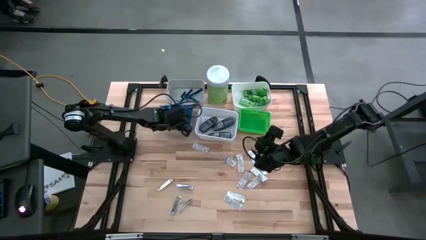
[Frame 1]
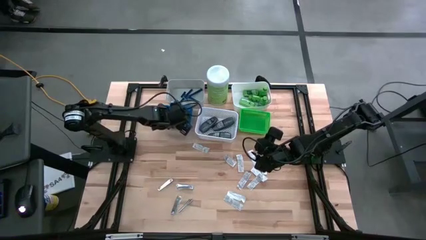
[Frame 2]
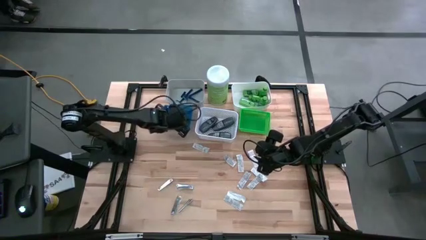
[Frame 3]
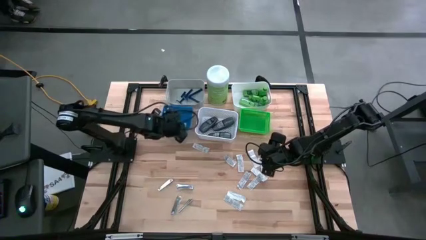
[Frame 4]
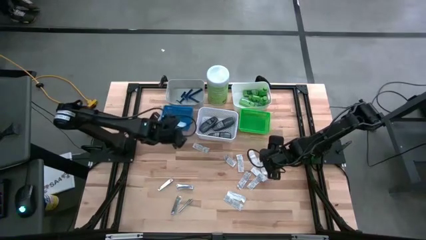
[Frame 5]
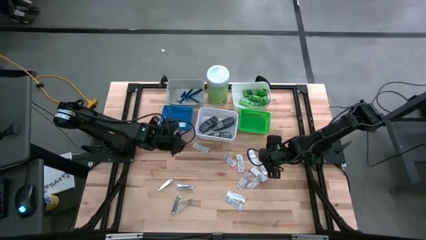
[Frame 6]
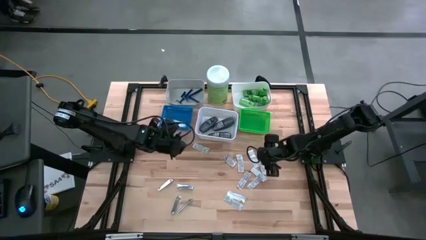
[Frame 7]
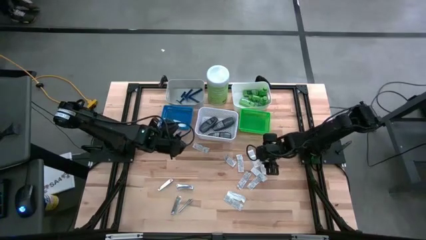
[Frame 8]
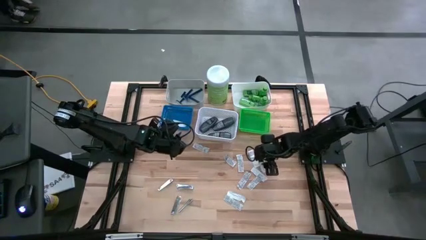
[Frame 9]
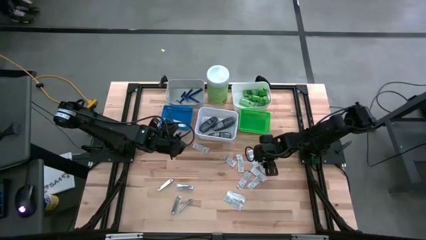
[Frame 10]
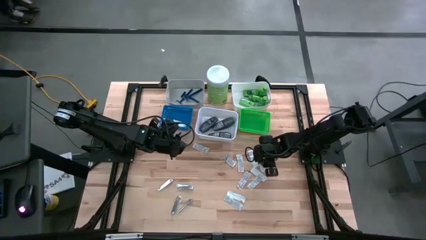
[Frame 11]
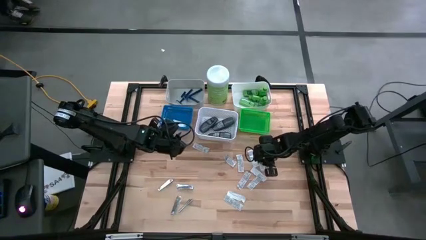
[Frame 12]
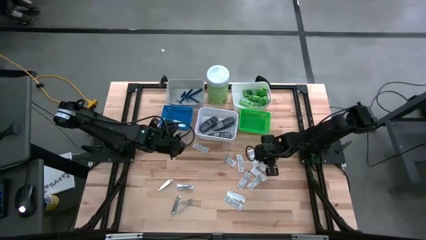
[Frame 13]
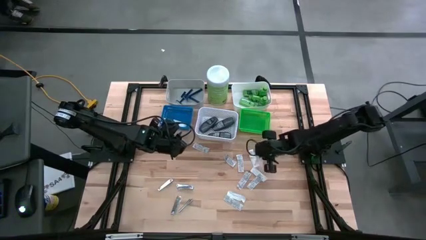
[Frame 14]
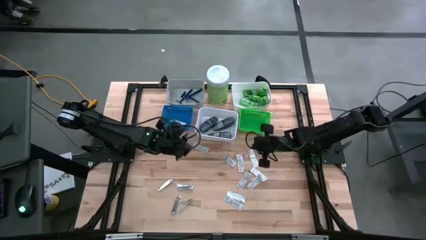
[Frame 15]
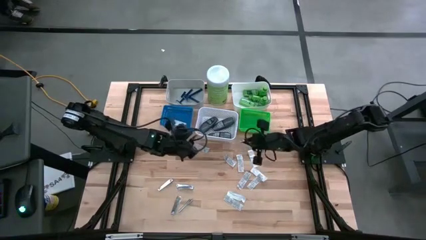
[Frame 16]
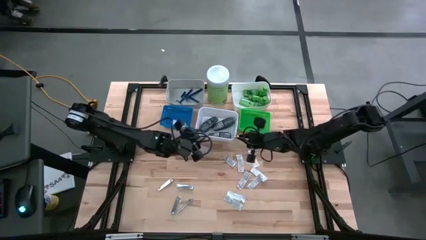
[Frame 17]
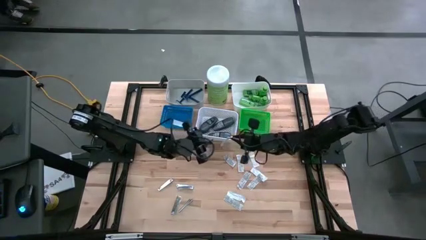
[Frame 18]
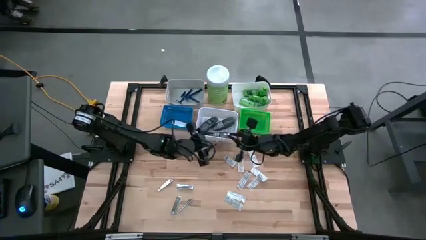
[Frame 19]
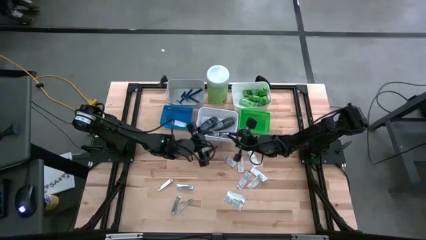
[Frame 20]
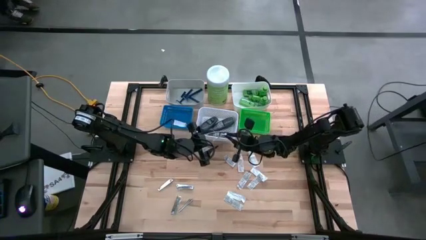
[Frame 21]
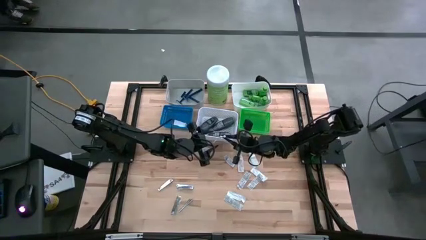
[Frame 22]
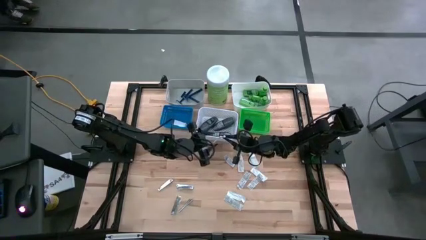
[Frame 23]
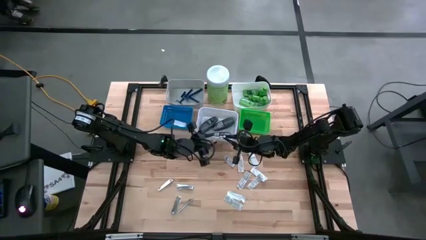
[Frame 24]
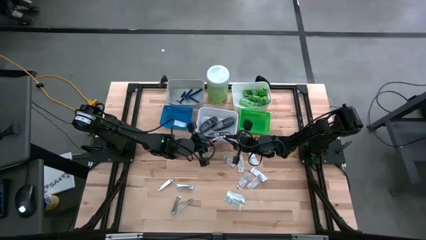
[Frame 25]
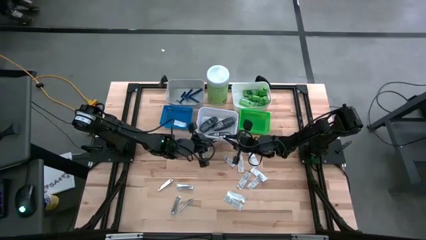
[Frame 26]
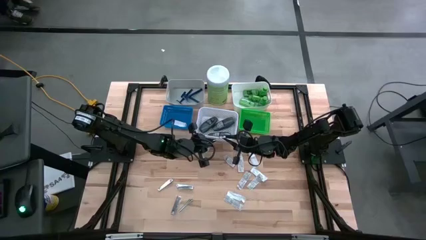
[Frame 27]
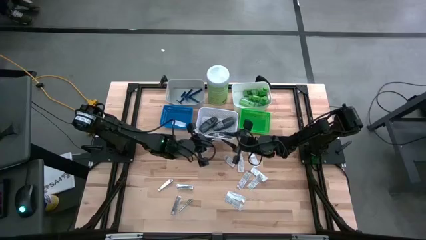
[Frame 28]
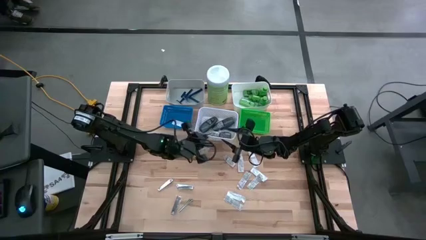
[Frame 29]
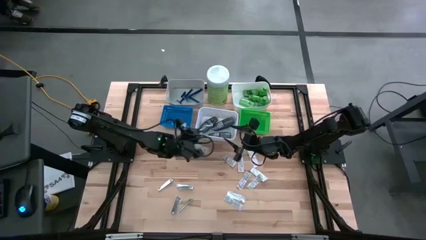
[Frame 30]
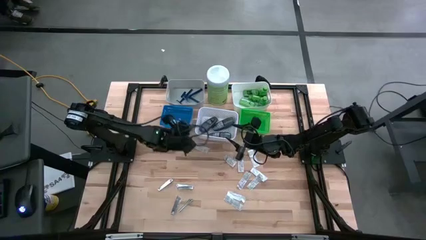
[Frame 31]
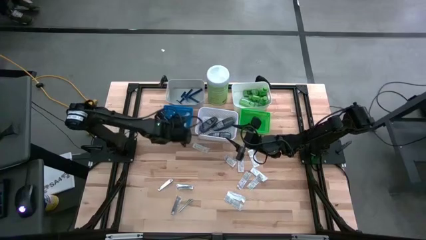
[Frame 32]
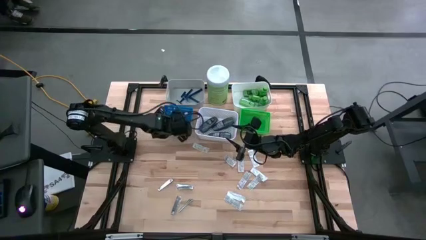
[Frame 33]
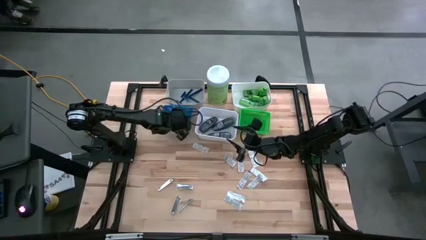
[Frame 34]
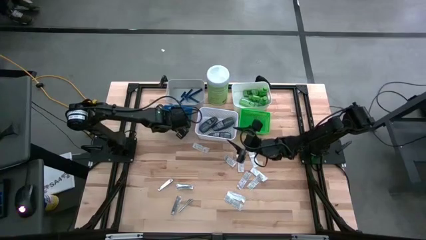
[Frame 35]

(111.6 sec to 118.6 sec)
Task: Pick & Place Travel size toiletries
Put the white bandage into the blue bin

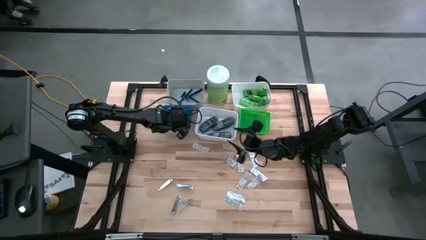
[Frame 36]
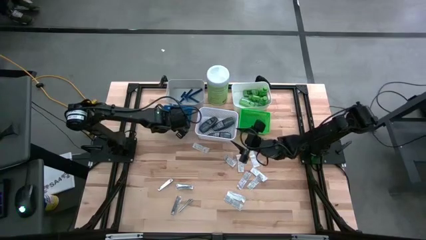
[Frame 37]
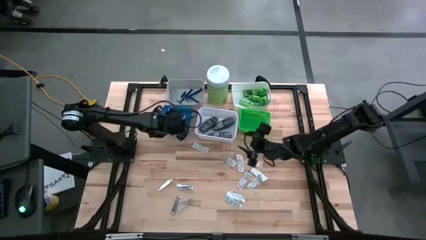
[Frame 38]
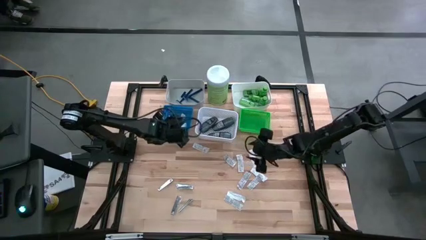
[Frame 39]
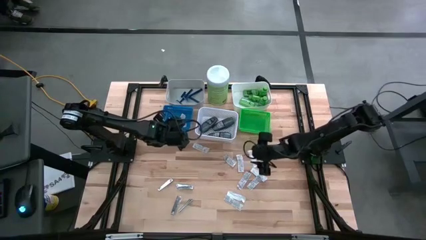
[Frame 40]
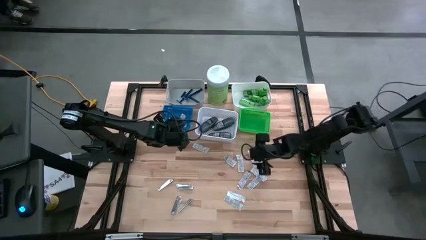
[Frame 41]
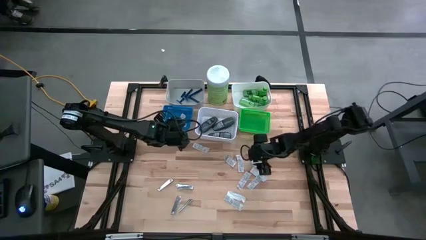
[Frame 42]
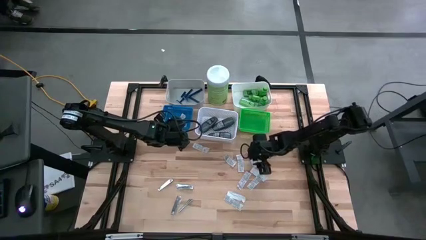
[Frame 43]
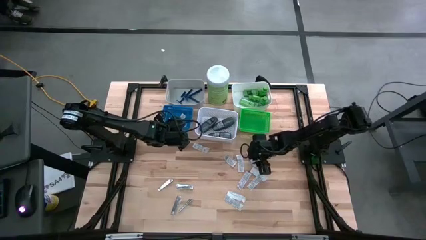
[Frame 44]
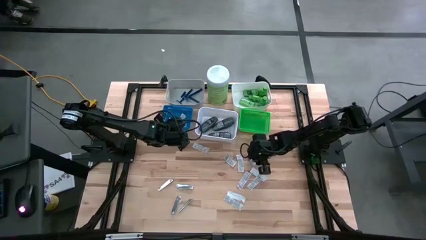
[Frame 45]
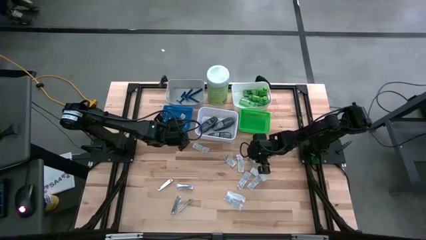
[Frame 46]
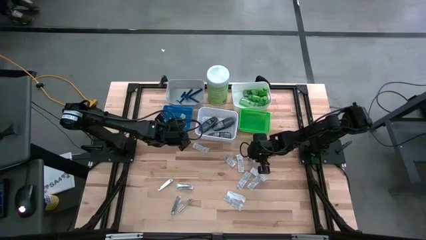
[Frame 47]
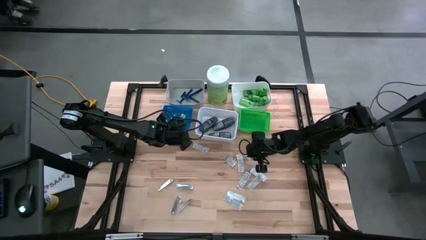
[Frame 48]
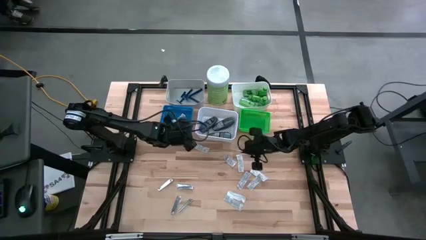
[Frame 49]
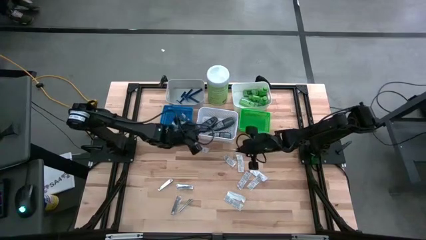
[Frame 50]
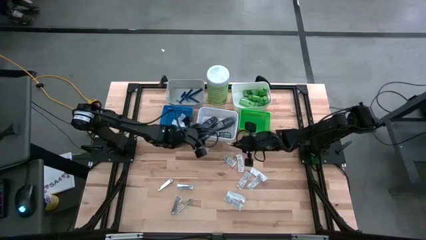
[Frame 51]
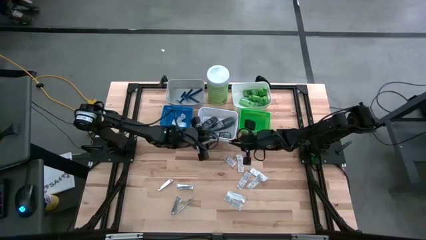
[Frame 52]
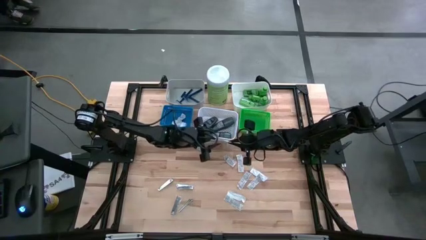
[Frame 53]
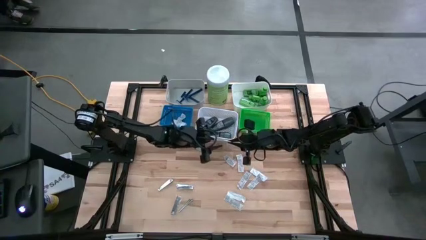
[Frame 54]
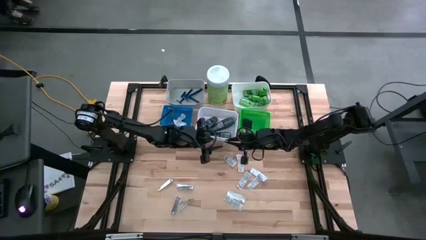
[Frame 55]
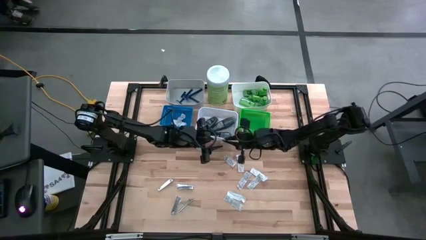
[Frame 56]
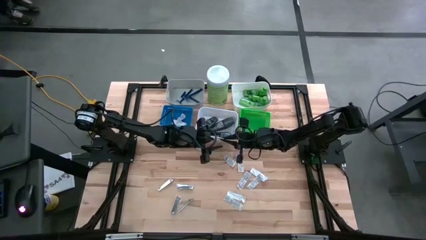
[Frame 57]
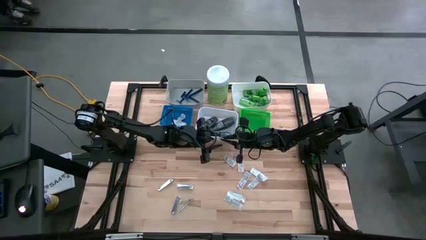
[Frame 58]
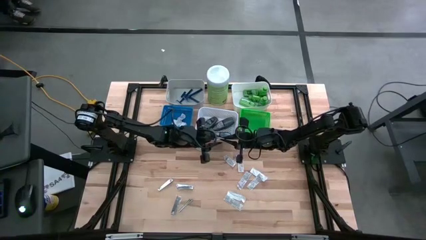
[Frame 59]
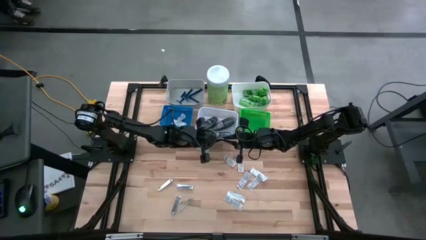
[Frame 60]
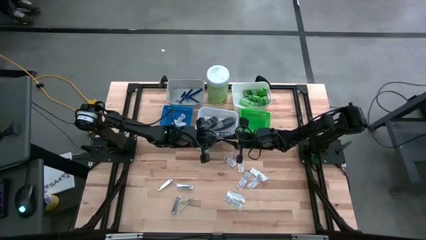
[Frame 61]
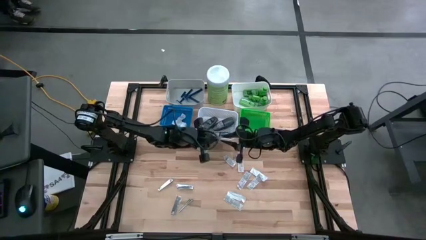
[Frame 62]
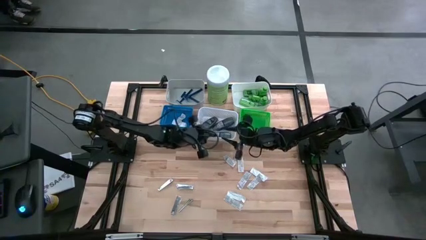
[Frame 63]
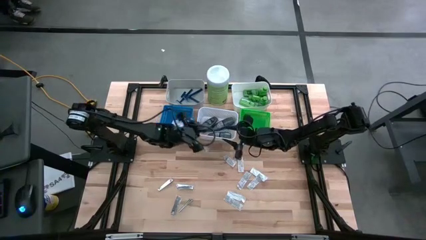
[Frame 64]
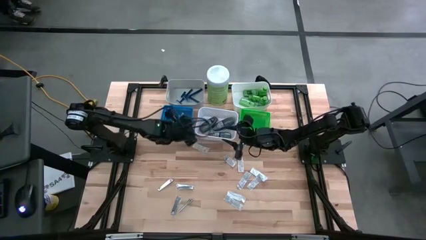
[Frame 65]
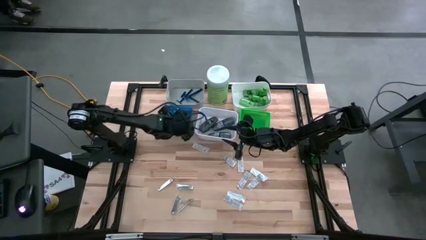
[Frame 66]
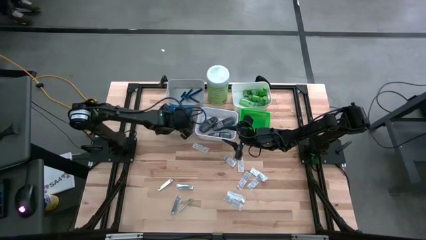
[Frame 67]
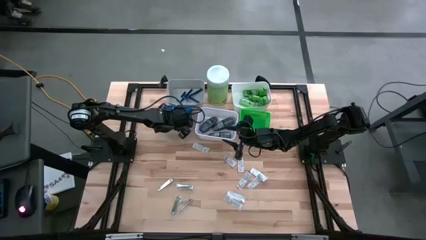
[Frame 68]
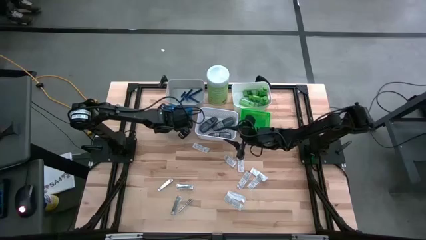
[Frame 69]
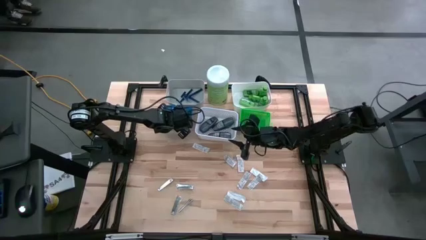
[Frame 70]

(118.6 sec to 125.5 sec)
Put the white bandage into the blue bin
